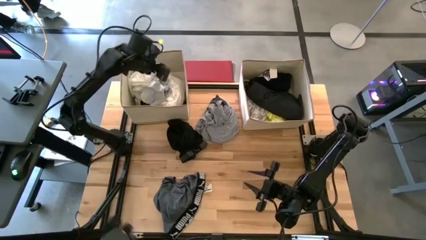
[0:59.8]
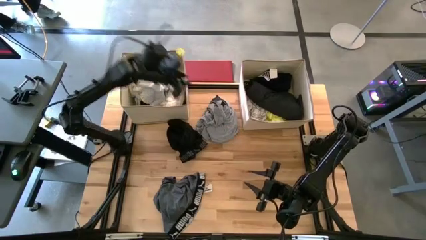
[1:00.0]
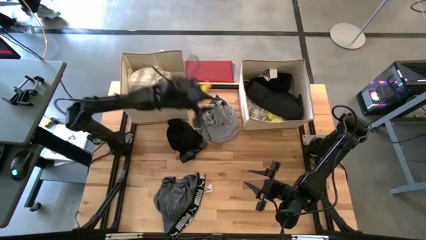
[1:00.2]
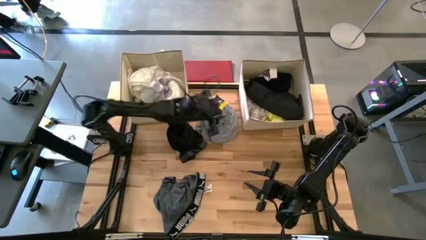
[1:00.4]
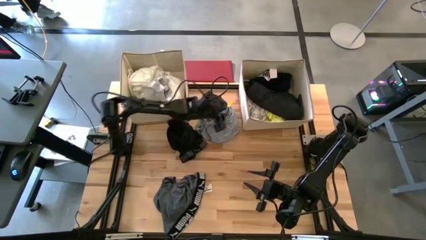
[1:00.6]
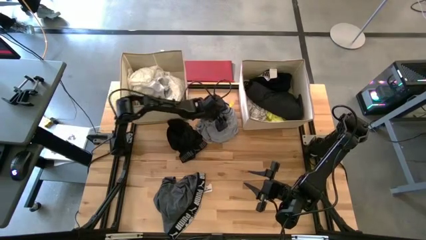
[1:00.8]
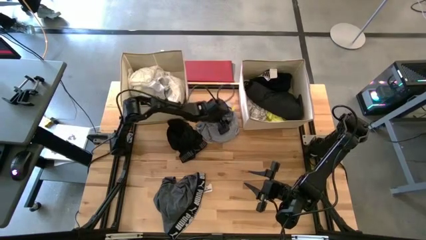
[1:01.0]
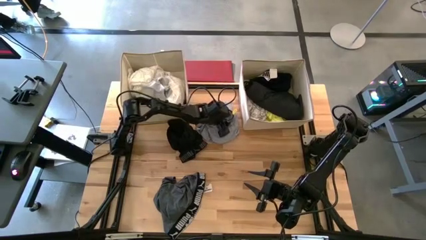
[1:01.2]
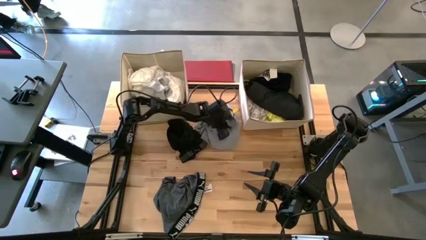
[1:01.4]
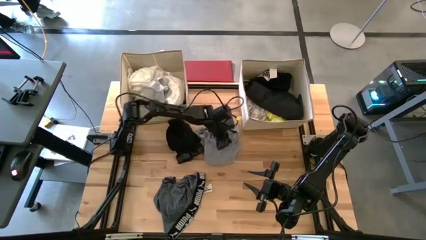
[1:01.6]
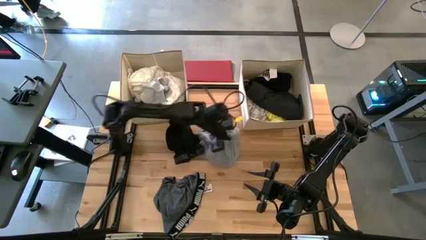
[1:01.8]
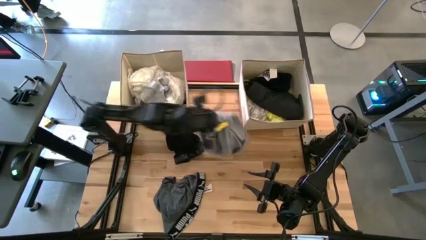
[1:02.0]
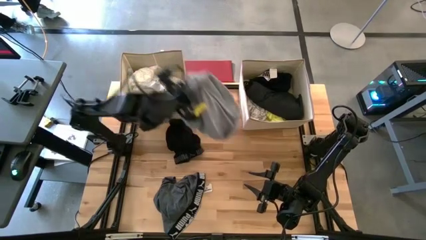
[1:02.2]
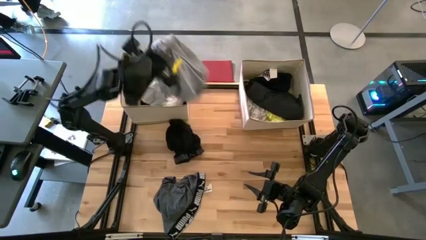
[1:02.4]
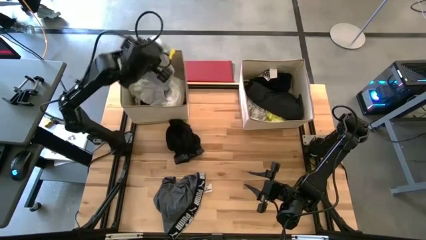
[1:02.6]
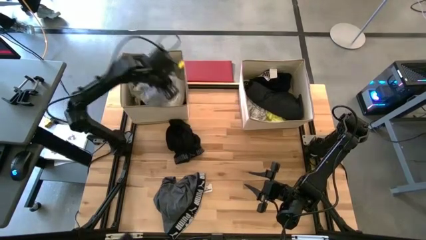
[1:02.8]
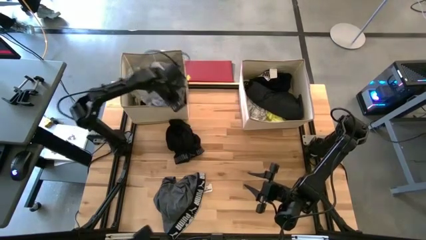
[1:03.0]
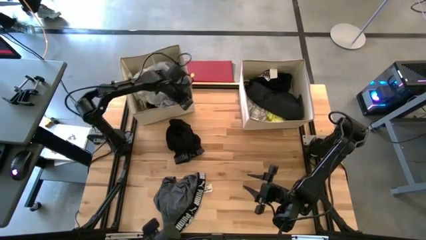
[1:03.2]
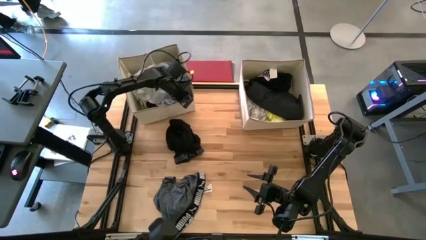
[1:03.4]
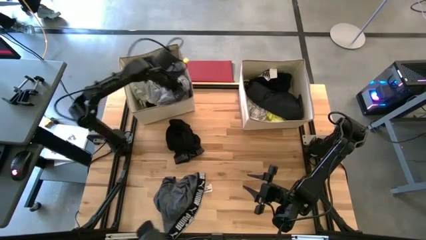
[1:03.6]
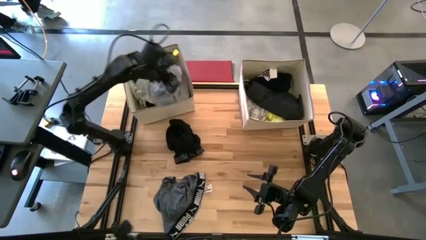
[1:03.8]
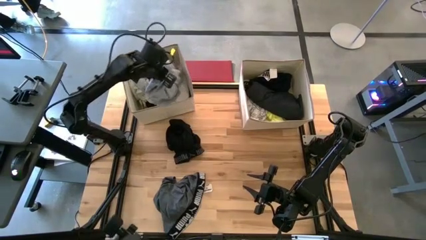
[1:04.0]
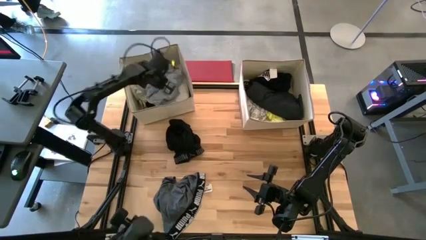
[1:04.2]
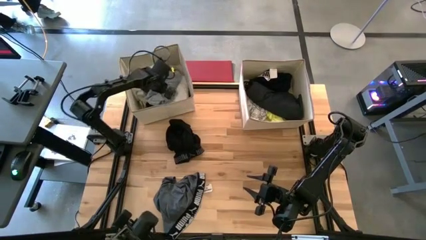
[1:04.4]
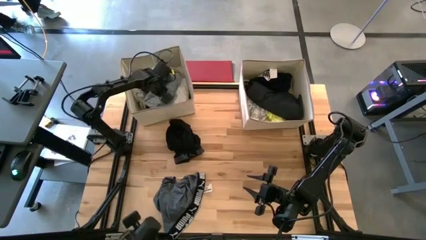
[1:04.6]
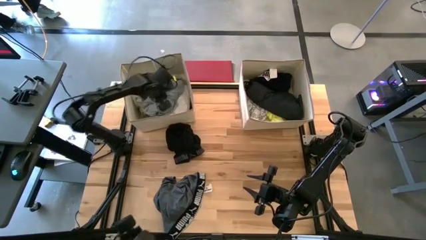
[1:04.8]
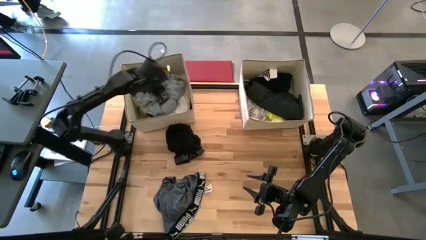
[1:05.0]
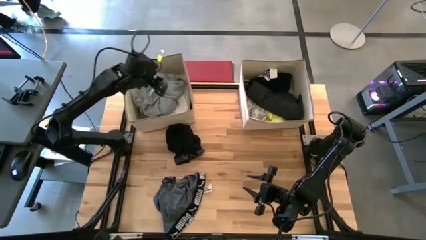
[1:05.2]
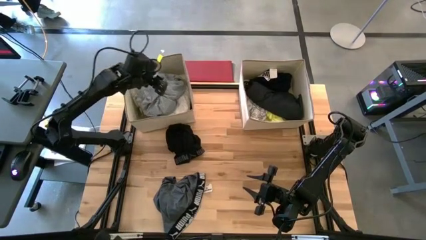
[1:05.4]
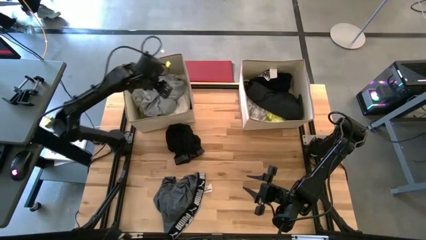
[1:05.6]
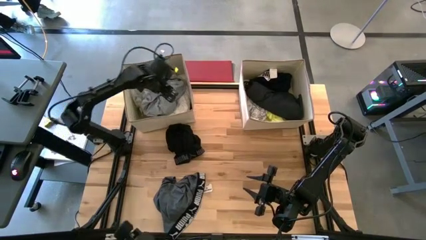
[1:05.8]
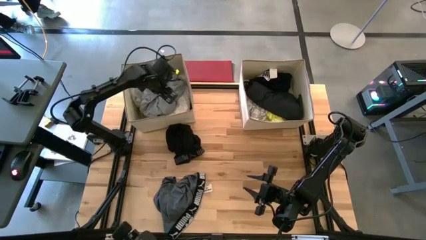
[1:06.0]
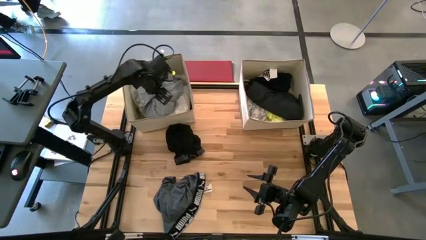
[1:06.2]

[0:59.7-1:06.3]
Task: Sort clothes
Put the gray shirt into the left laundry organizer

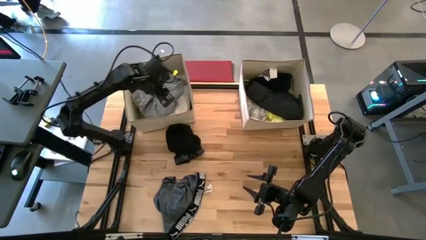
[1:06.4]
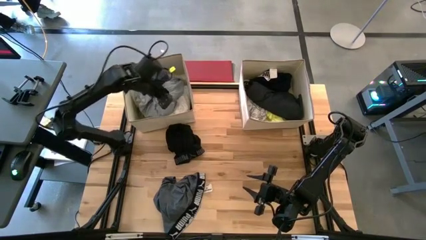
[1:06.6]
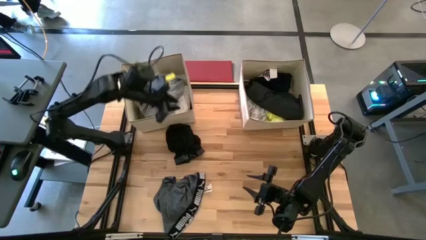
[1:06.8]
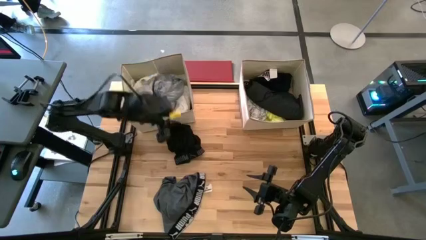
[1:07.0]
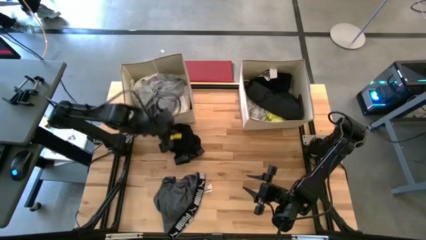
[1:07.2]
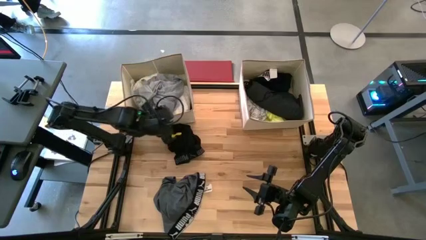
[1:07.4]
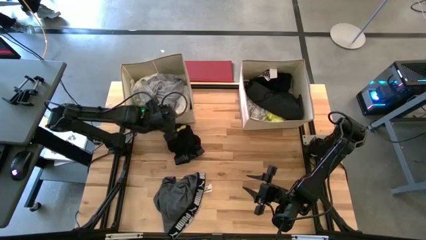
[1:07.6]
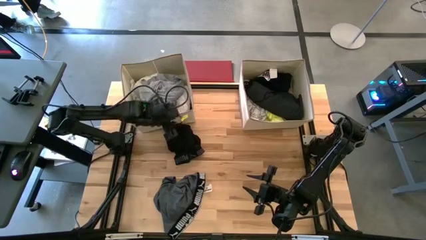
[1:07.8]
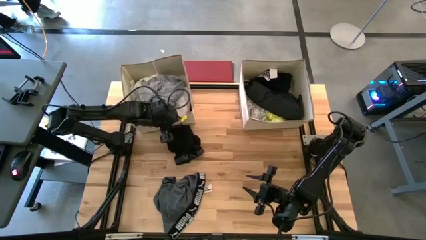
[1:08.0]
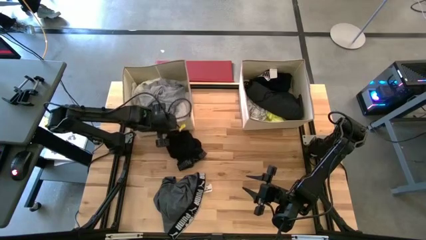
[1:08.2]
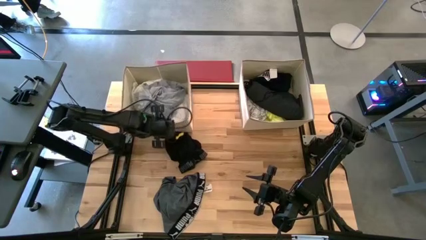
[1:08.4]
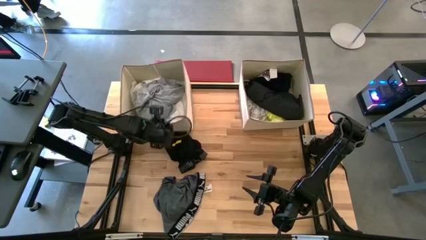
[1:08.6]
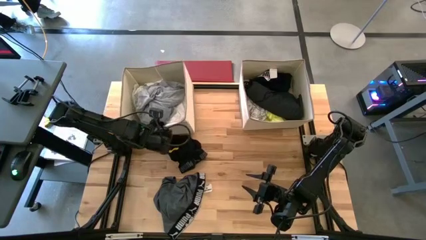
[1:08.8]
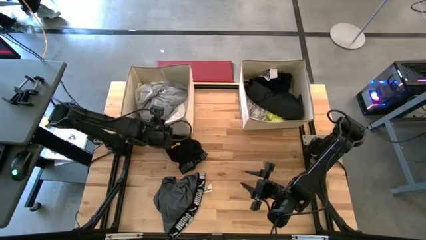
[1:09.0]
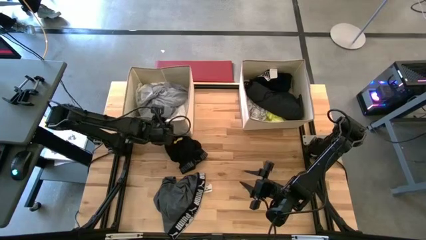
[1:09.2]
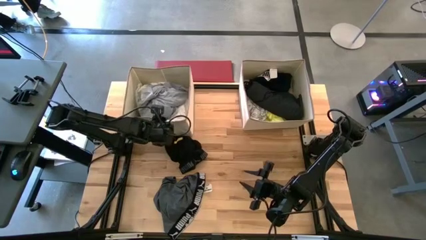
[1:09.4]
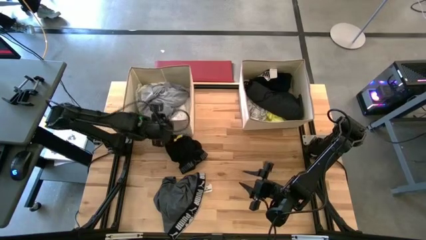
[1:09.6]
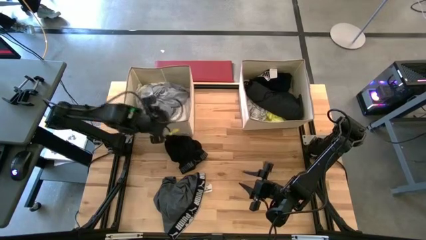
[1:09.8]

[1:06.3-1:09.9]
Adjust the left laundry organizer

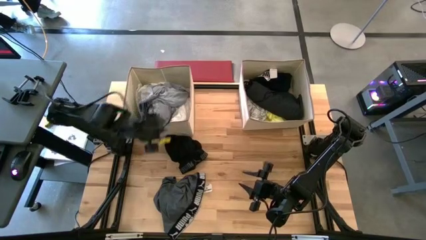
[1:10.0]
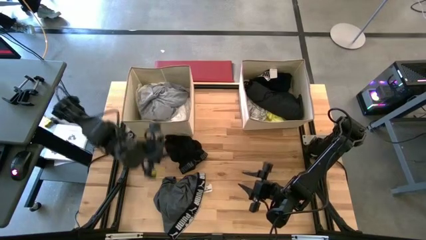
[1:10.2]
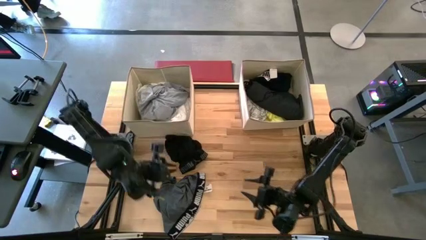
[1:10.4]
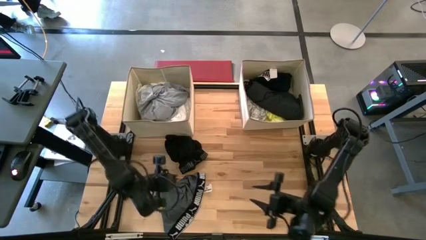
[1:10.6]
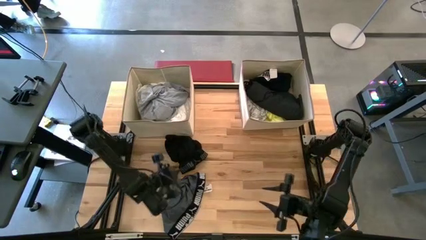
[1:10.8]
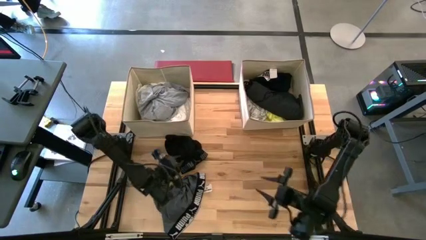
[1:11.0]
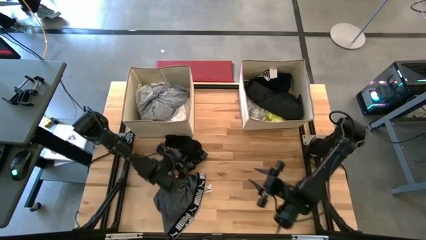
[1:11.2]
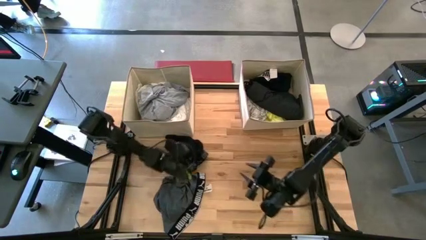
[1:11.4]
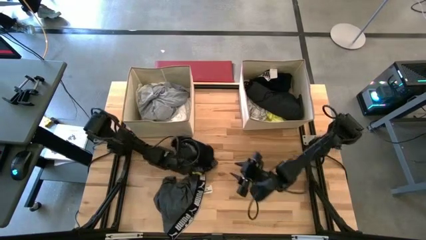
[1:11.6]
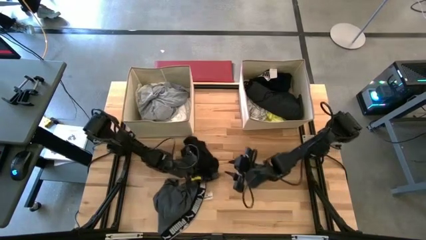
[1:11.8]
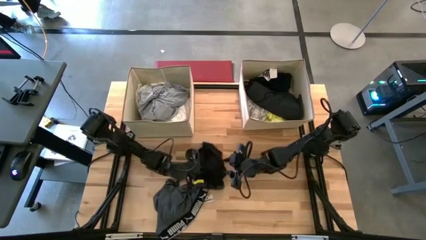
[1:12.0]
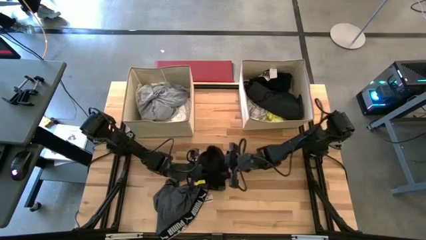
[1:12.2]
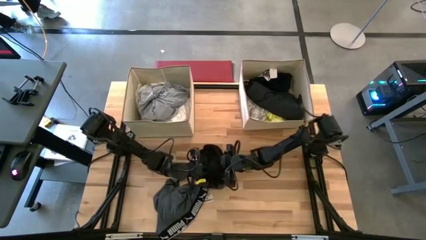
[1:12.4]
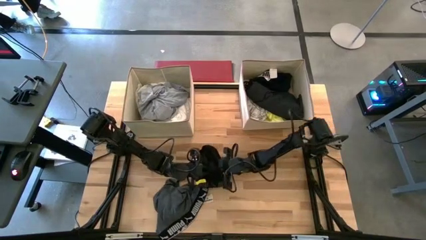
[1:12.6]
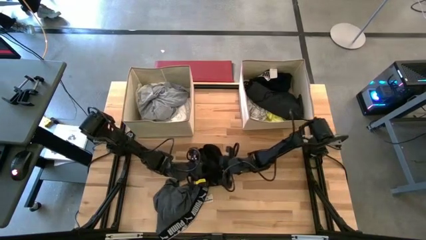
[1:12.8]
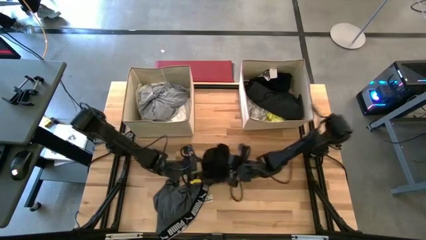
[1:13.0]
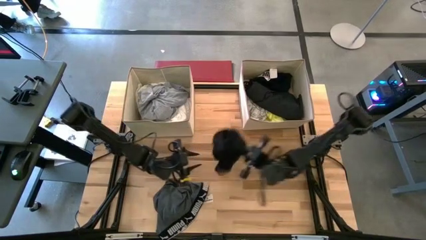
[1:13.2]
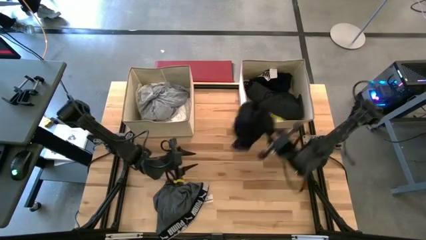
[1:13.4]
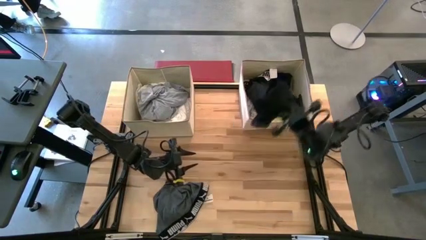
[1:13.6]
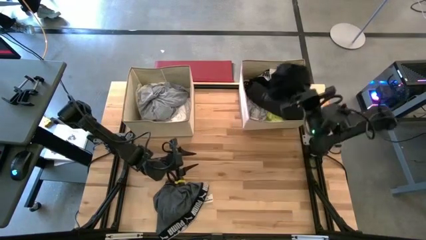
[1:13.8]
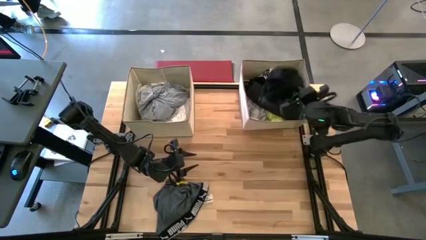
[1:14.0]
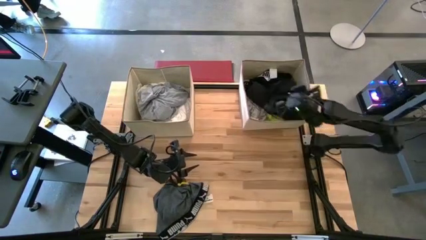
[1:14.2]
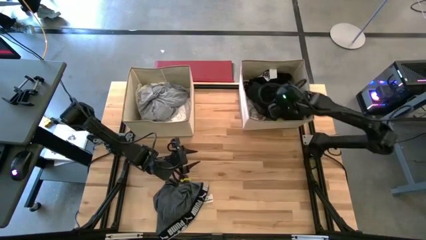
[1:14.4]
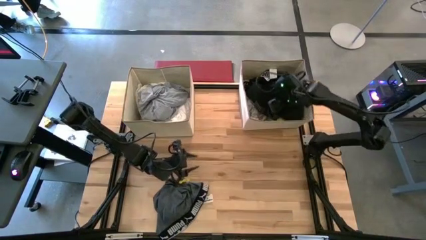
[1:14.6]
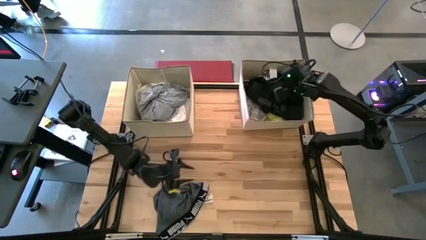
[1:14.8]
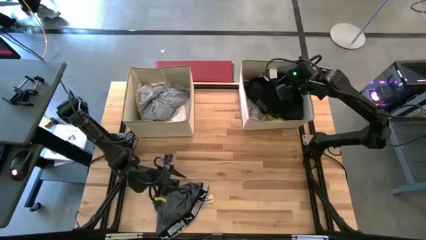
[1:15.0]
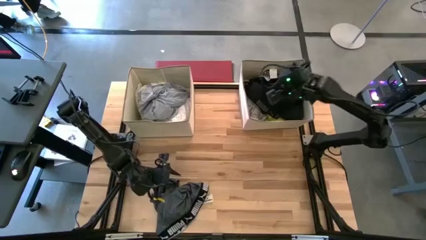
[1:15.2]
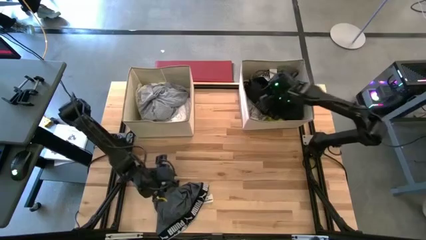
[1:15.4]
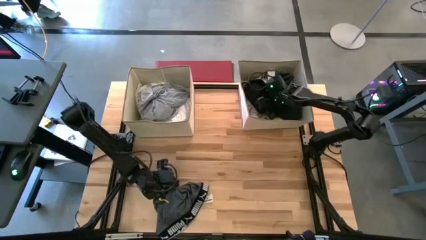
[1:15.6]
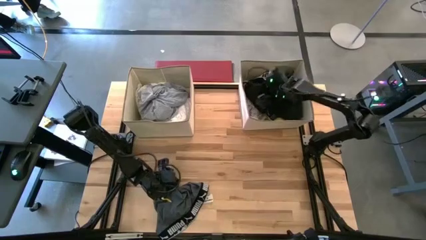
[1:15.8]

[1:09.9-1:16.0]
Put the black boxer into the right laundry organizer
